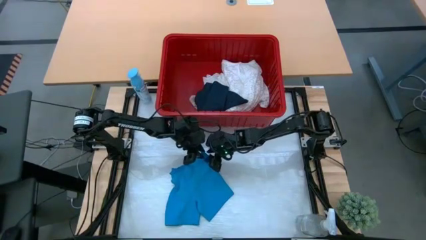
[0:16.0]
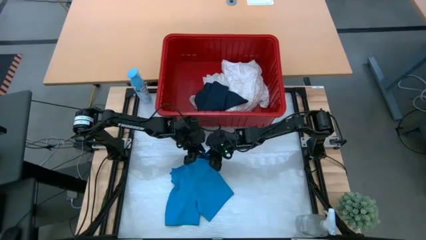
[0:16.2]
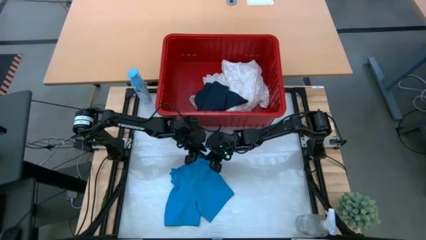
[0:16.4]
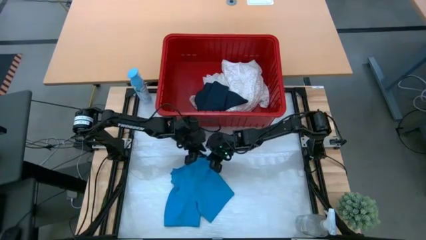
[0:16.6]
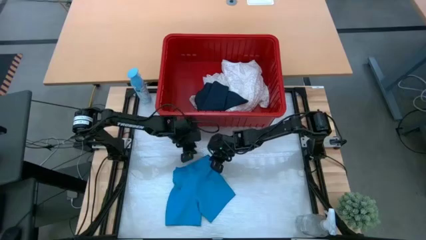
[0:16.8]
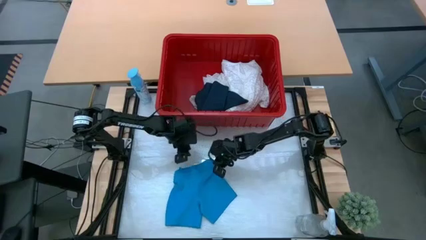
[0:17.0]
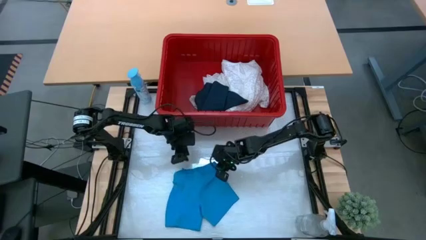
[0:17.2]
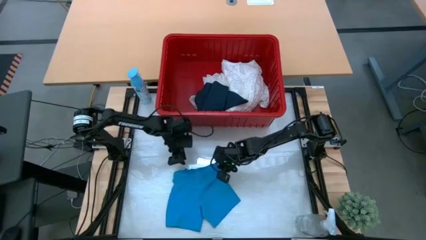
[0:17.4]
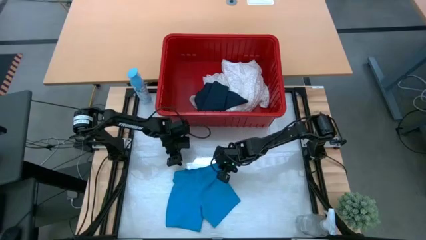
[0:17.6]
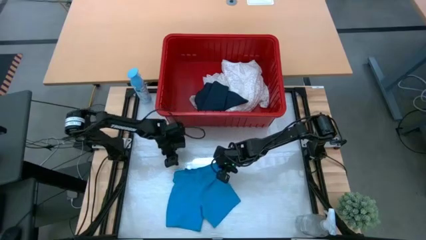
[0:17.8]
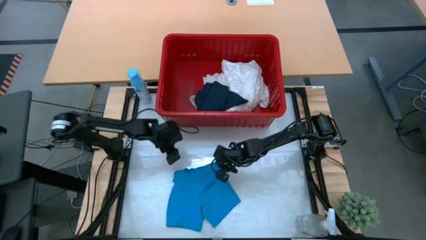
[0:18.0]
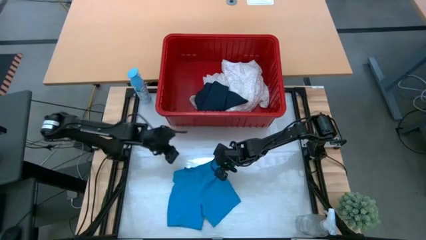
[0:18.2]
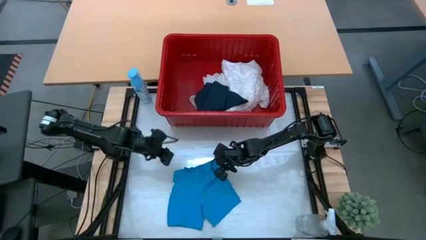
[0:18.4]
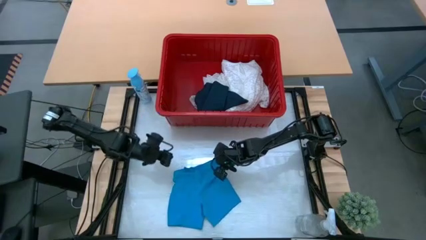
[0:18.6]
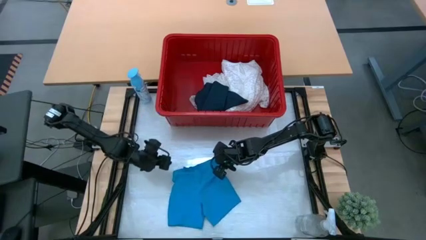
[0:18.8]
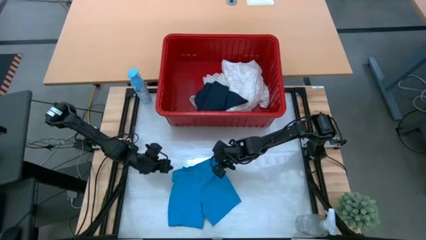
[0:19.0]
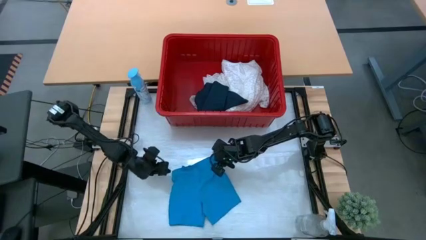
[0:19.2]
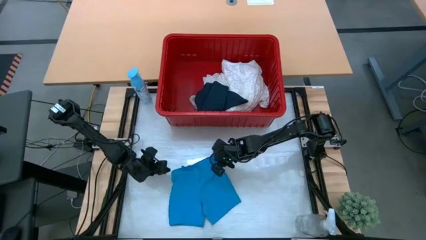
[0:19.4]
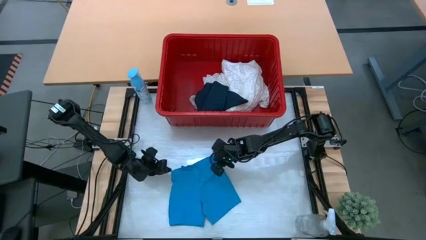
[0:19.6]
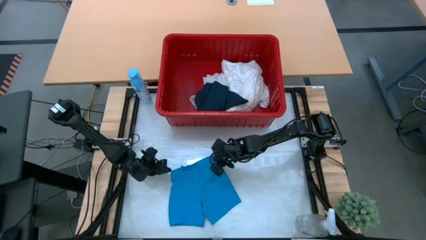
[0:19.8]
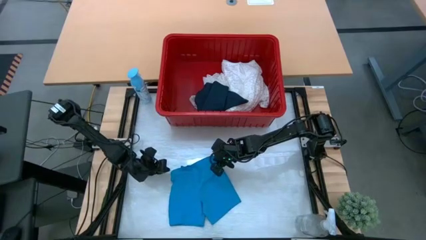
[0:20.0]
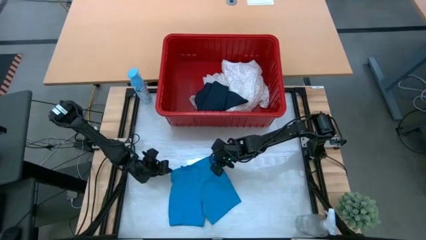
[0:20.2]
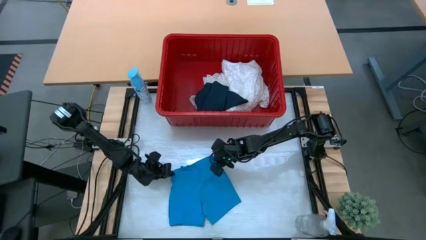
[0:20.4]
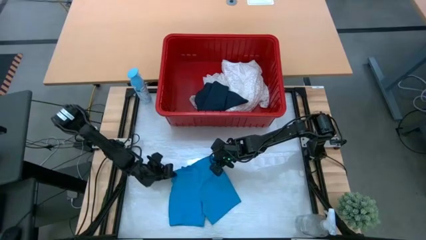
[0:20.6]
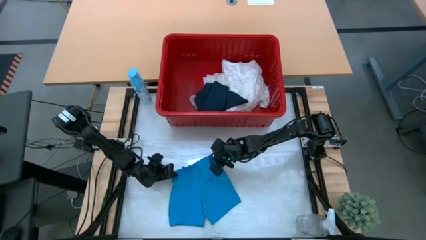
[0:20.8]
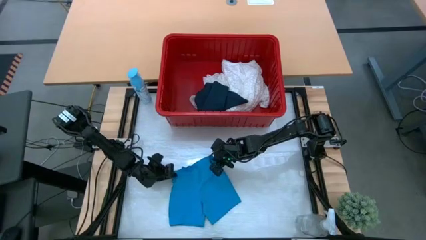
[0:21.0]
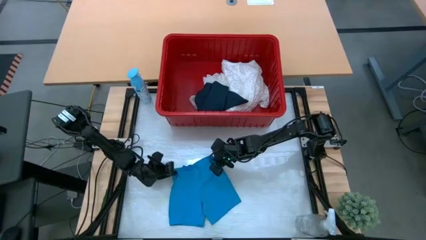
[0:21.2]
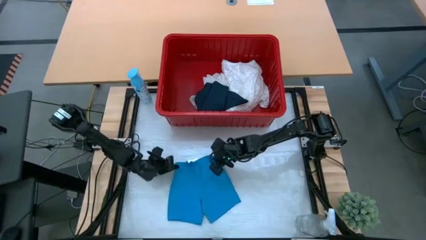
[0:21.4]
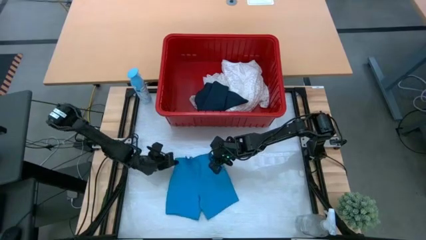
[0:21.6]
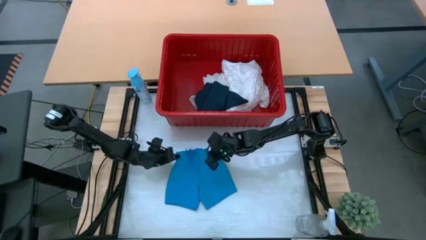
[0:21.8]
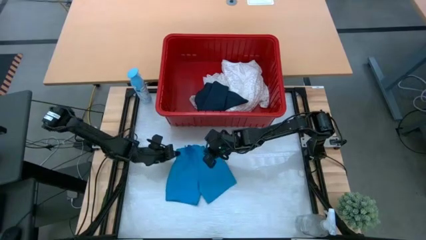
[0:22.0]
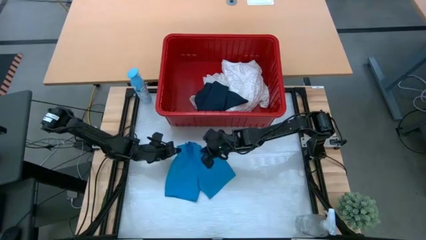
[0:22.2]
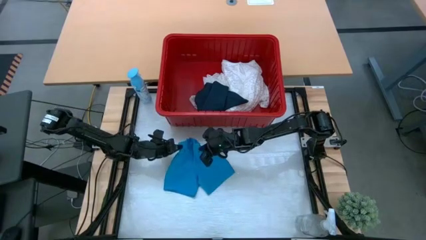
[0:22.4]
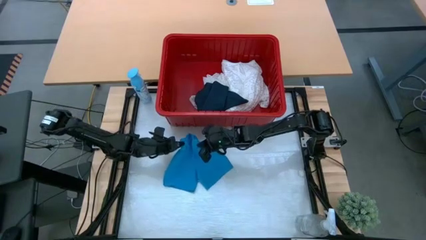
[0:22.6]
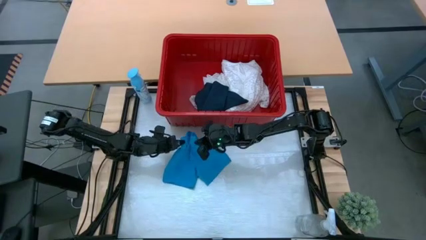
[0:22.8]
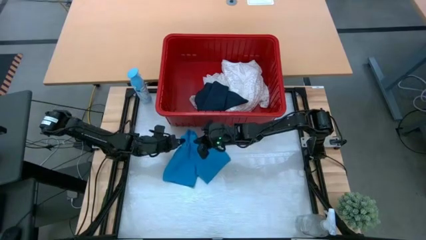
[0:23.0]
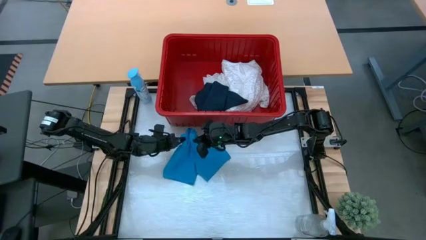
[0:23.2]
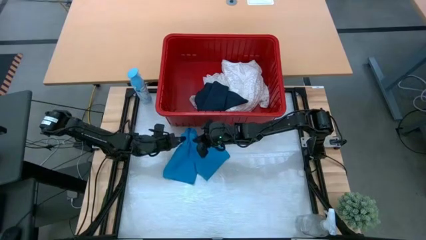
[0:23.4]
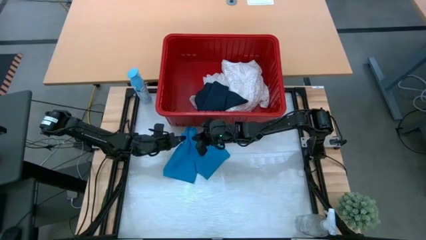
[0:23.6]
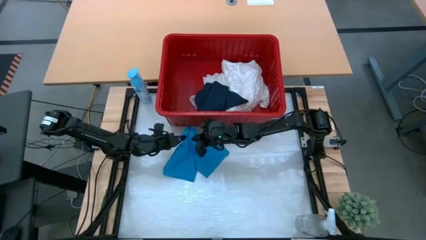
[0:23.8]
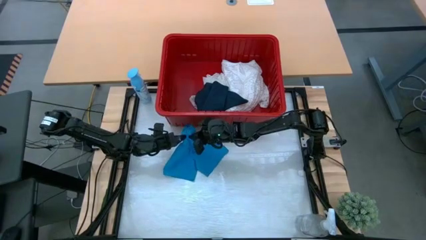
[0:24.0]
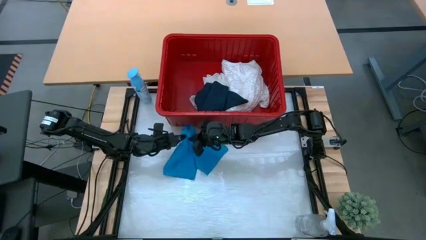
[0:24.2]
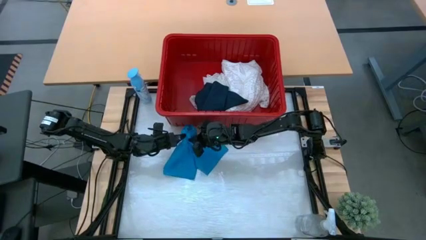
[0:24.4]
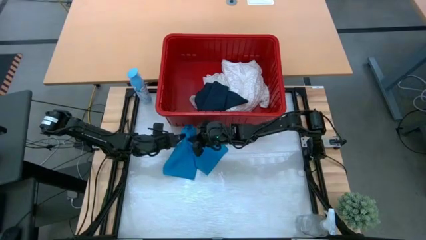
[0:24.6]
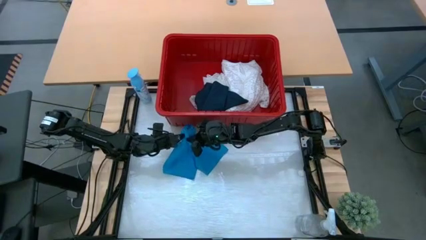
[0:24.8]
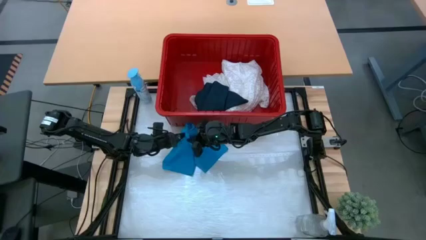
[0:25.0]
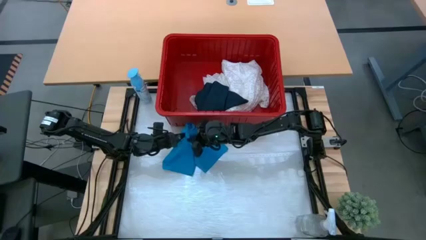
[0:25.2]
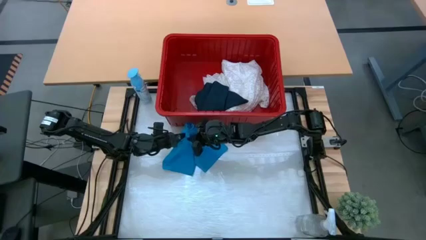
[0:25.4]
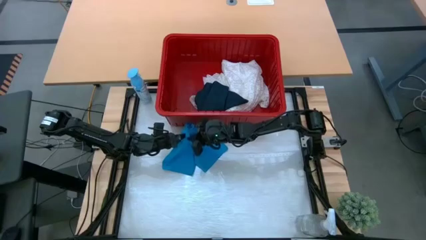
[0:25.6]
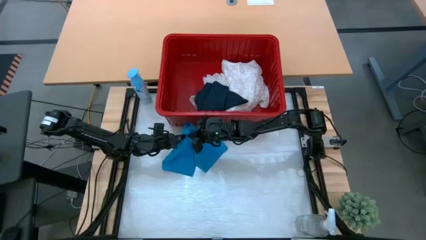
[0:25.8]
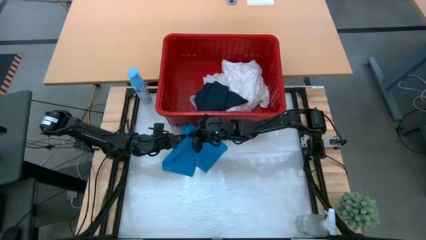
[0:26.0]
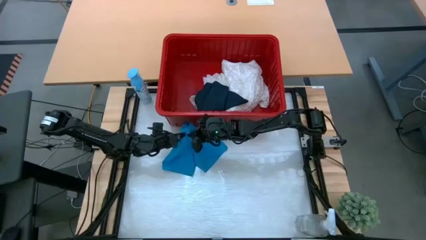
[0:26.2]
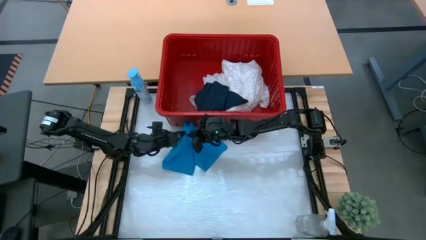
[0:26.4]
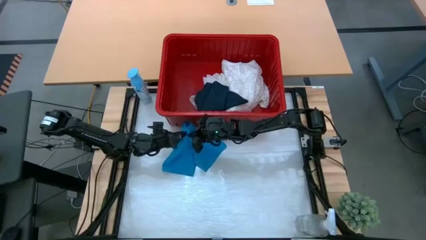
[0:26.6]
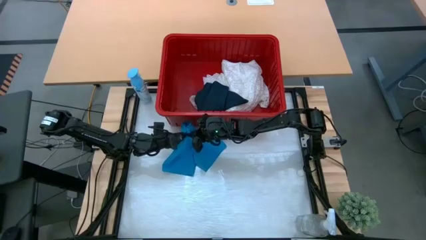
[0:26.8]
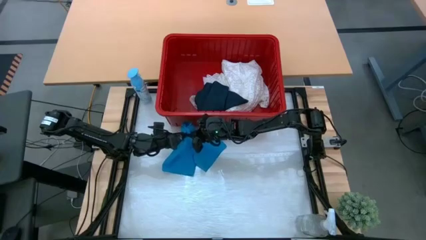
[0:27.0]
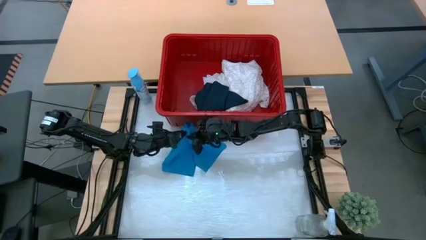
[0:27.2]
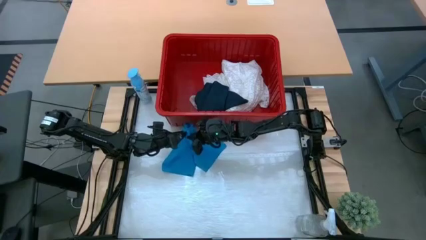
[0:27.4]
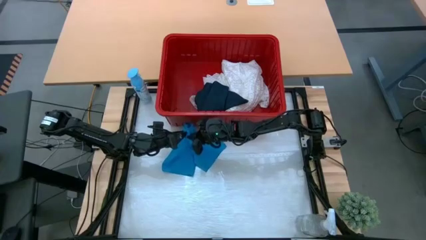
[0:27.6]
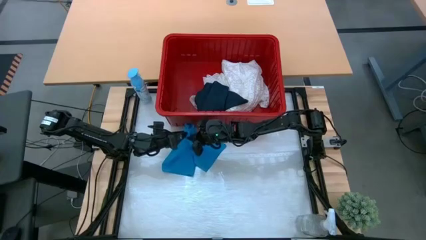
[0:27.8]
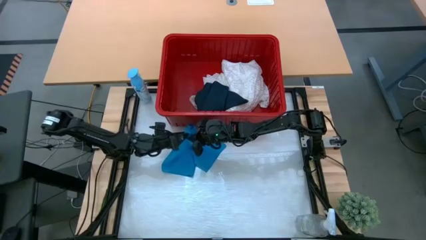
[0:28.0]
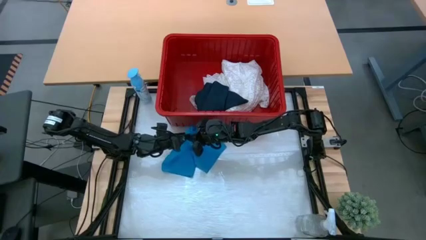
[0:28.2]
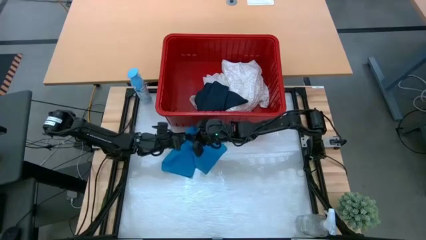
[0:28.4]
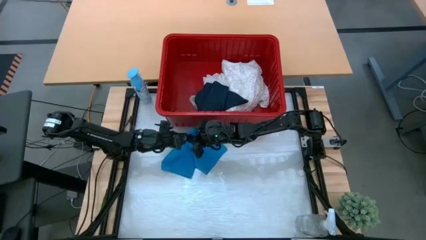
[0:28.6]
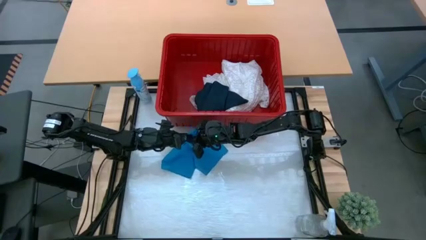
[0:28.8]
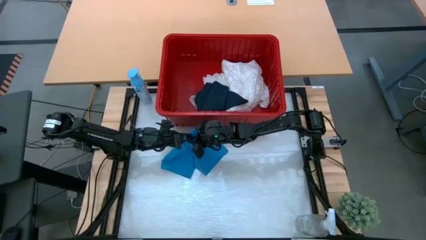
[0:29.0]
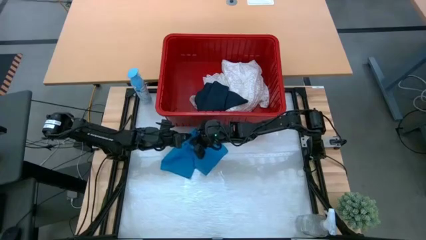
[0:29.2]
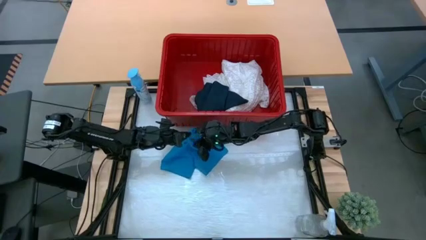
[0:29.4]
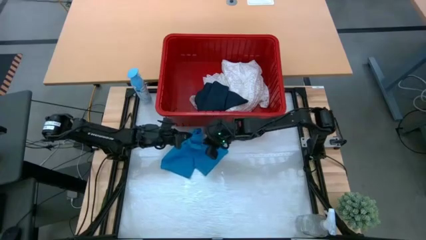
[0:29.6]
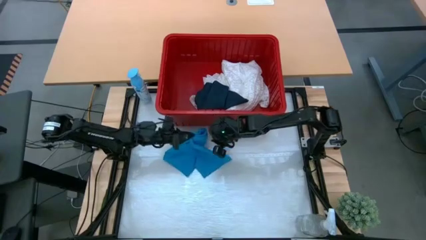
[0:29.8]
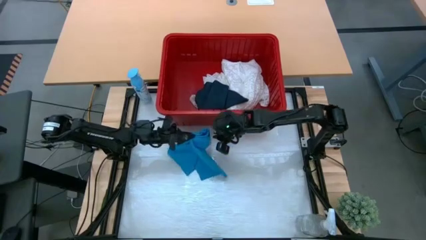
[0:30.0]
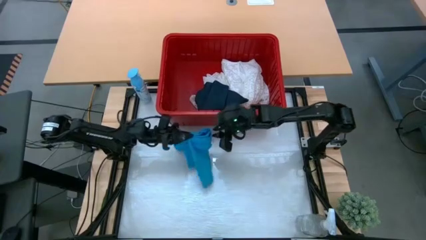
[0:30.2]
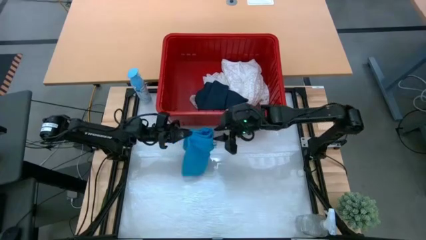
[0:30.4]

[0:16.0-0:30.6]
Task: Fold laundry
Fold the blue shorts
